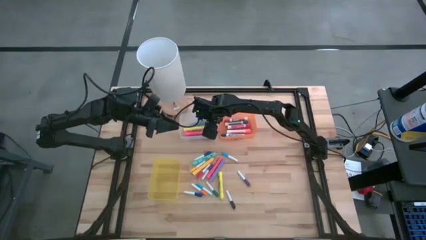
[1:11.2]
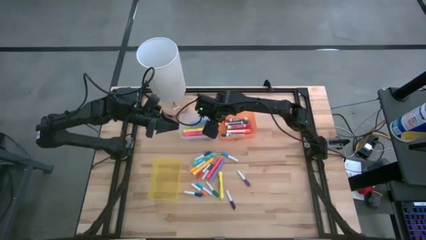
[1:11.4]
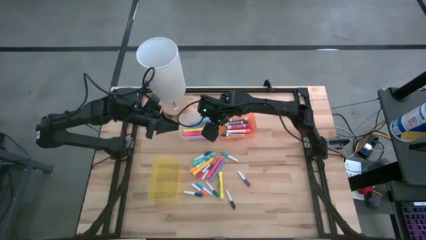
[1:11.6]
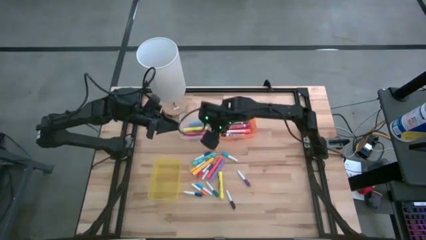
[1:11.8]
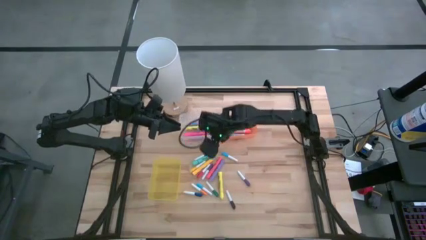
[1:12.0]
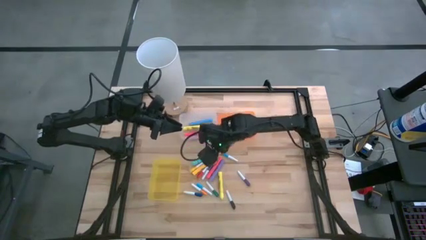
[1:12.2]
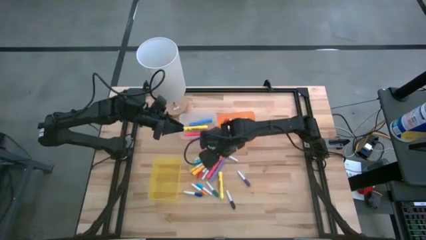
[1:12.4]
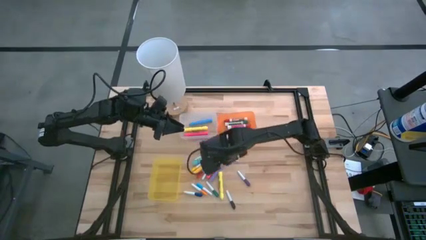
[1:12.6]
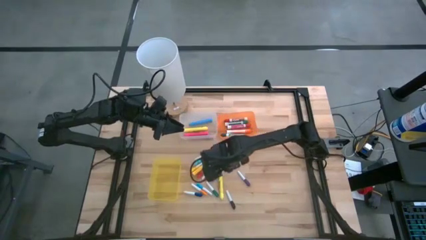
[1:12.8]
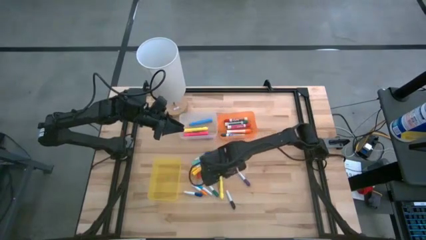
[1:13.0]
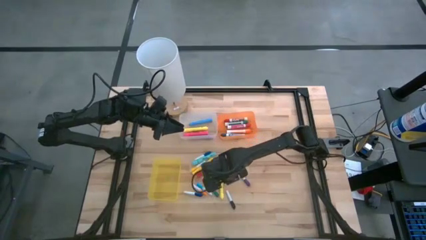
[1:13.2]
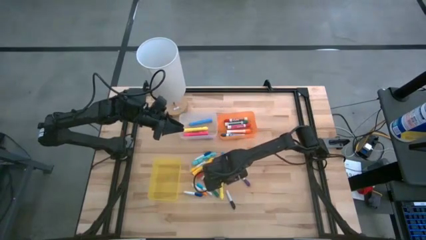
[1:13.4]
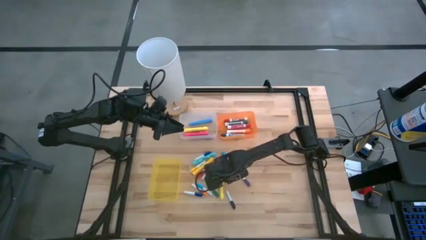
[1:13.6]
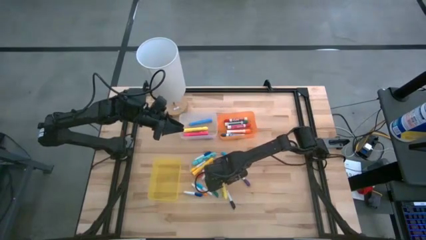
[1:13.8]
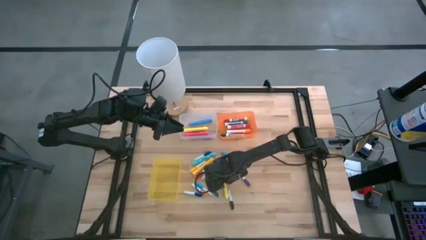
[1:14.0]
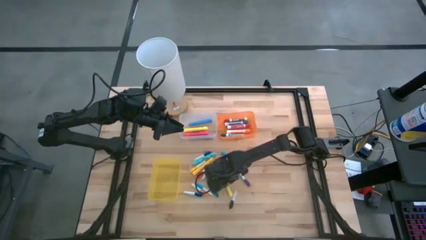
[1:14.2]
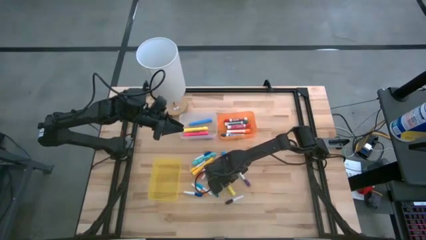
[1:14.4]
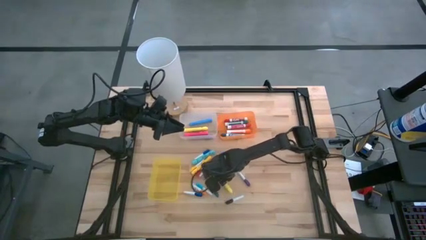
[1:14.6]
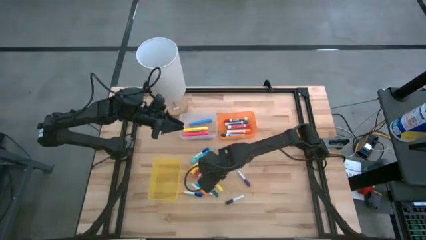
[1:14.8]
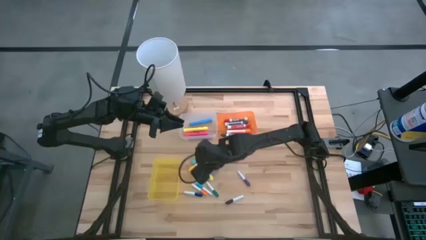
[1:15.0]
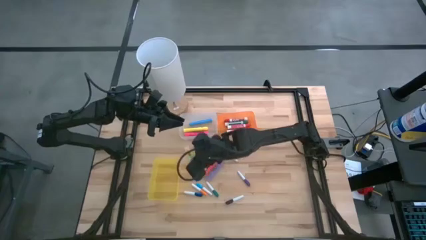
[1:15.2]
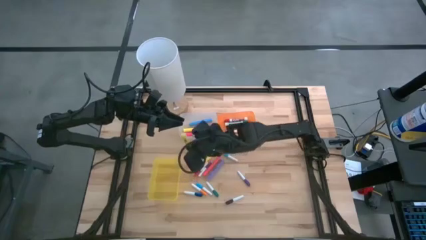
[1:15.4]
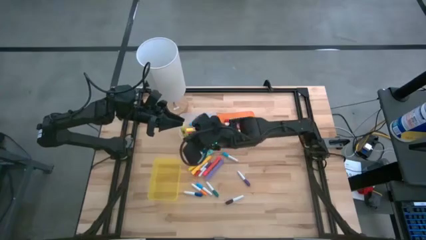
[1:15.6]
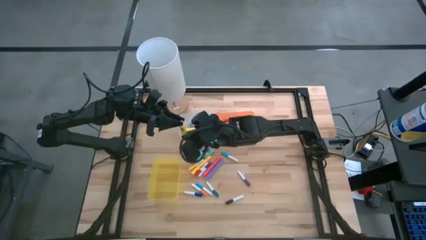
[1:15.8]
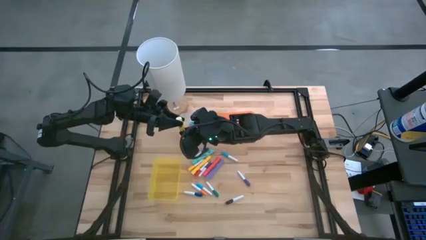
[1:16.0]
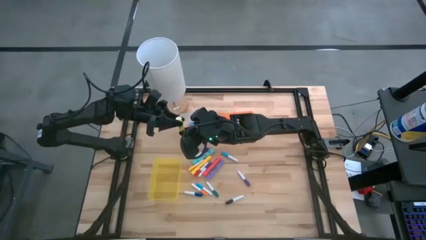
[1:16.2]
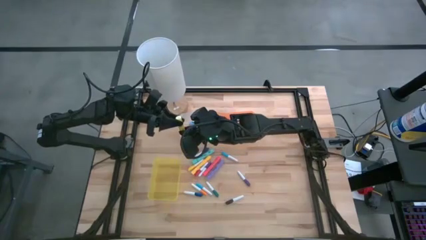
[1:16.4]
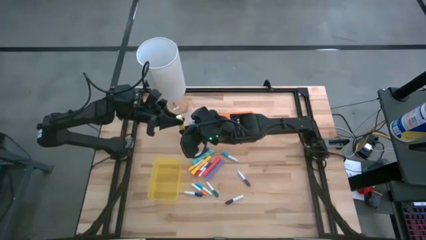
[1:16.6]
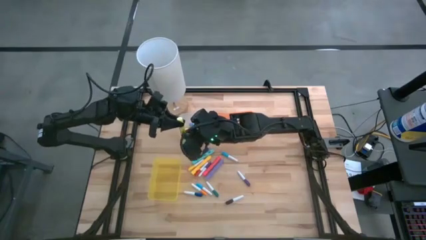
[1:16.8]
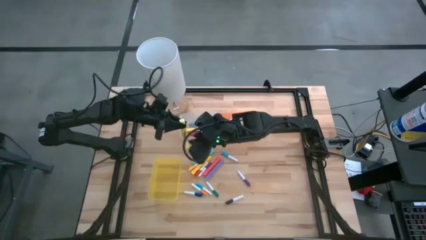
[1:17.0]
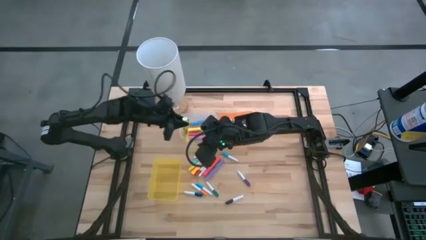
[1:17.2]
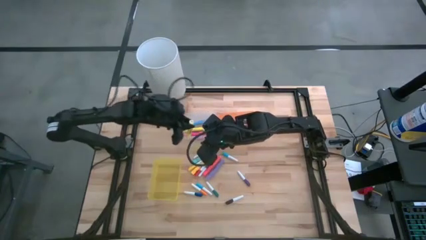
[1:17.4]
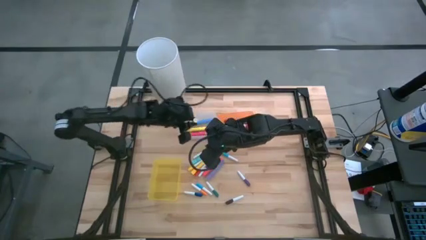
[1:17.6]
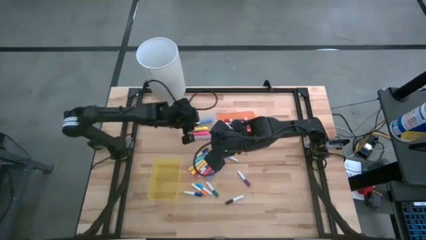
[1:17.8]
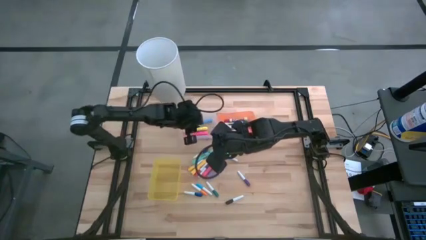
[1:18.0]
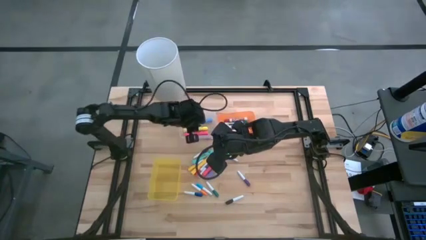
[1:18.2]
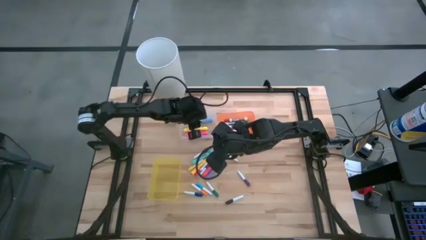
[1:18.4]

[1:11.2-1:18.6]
Task: Pick & Place Markers
Put the bottom yellow highlighter into the transparent bin

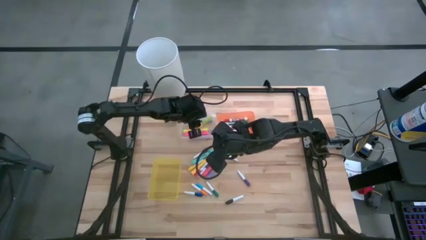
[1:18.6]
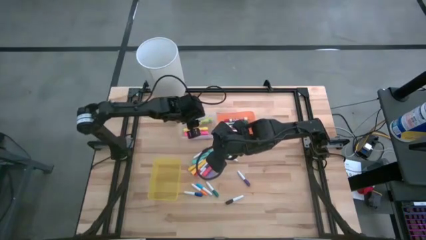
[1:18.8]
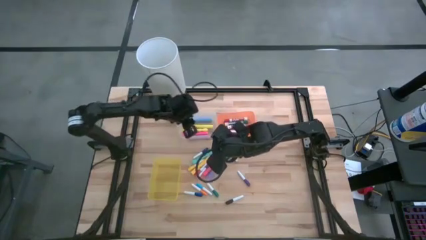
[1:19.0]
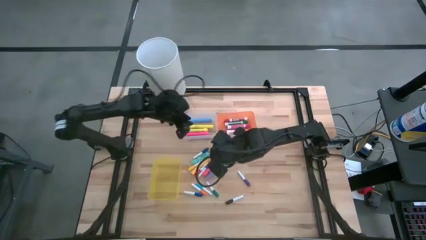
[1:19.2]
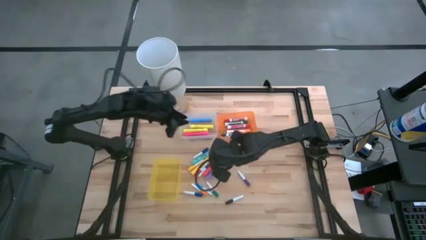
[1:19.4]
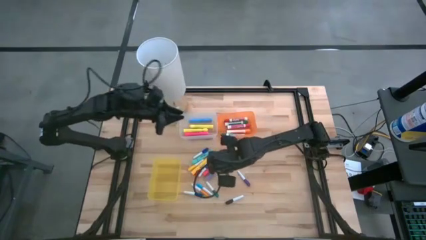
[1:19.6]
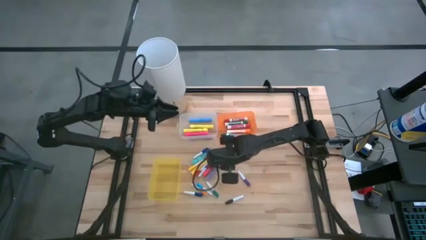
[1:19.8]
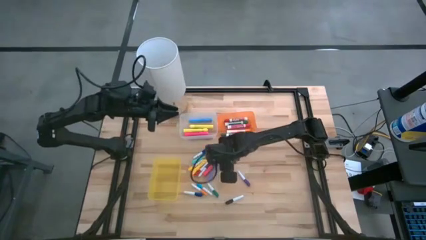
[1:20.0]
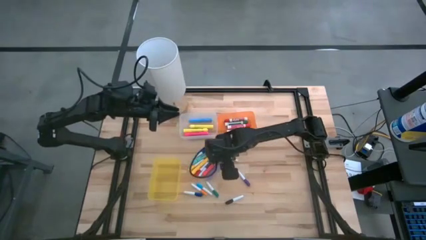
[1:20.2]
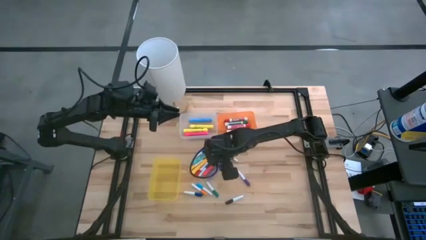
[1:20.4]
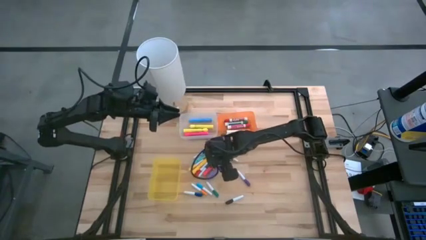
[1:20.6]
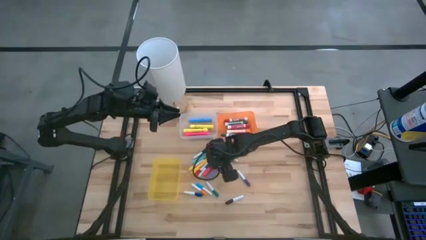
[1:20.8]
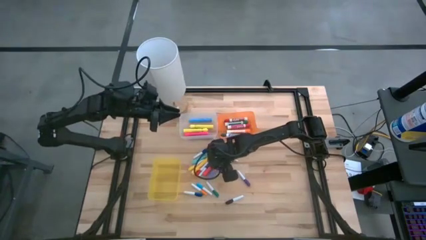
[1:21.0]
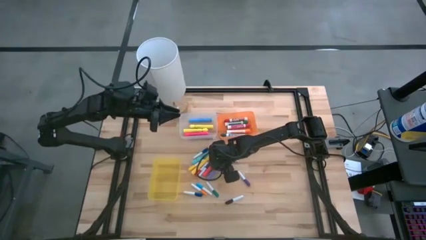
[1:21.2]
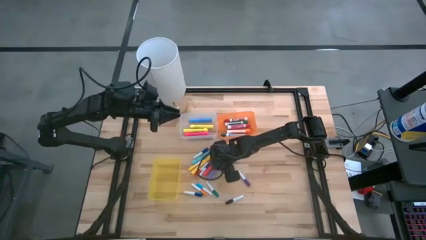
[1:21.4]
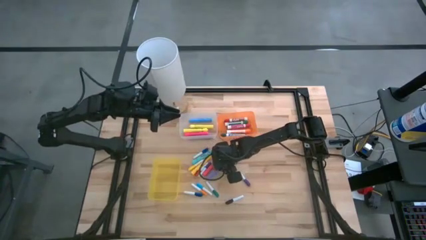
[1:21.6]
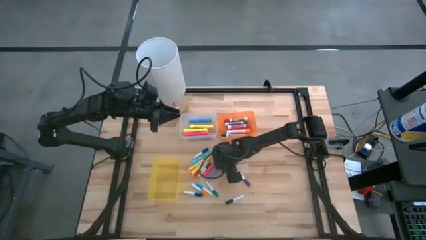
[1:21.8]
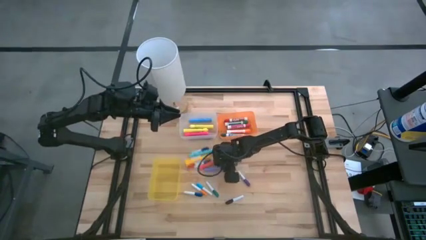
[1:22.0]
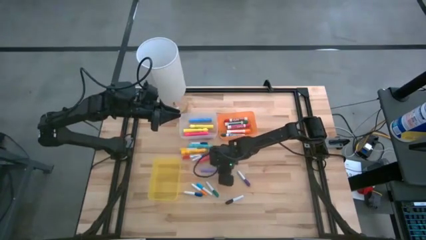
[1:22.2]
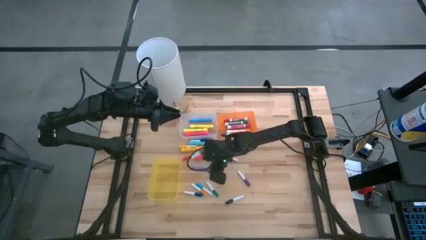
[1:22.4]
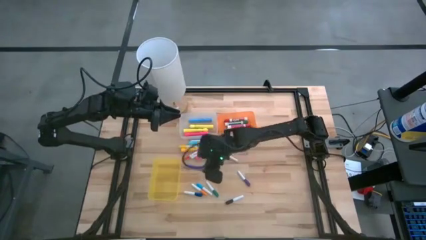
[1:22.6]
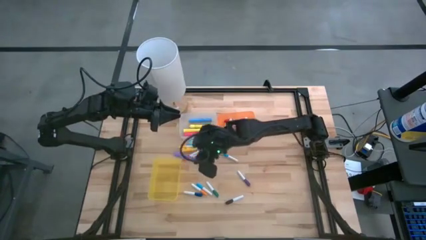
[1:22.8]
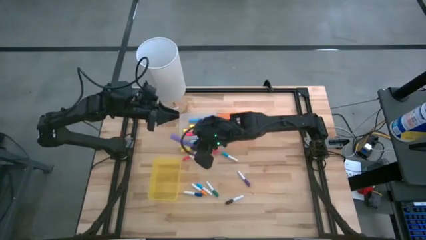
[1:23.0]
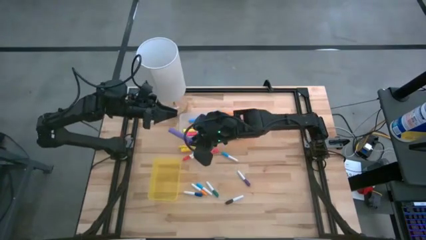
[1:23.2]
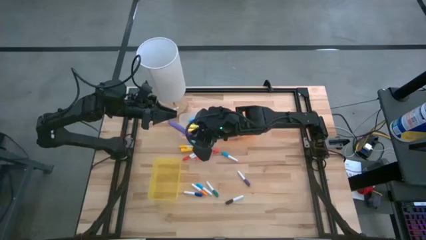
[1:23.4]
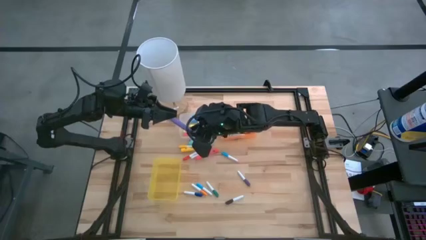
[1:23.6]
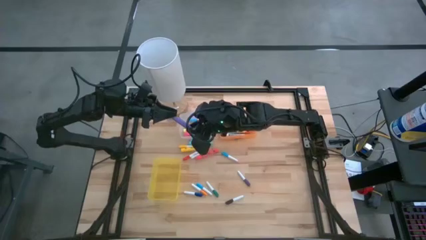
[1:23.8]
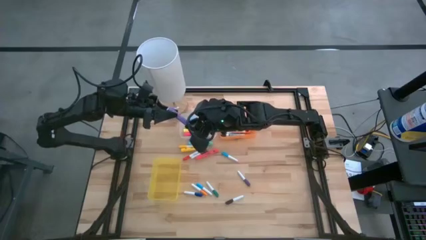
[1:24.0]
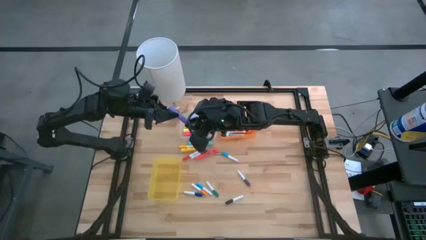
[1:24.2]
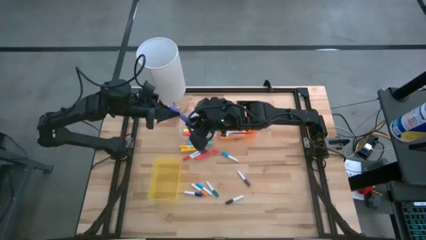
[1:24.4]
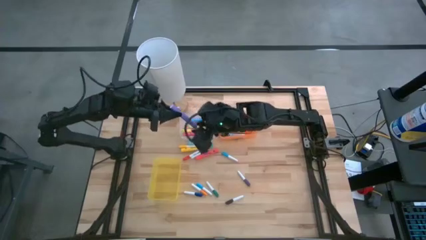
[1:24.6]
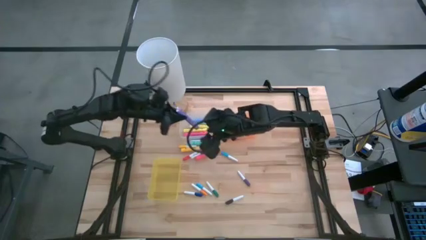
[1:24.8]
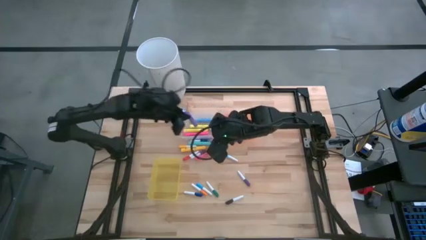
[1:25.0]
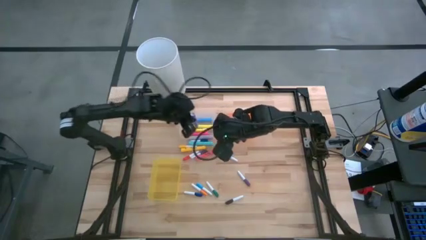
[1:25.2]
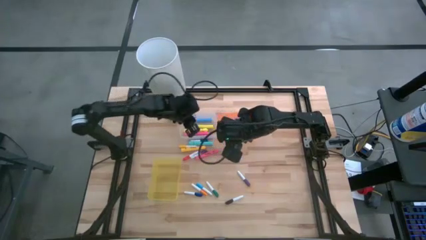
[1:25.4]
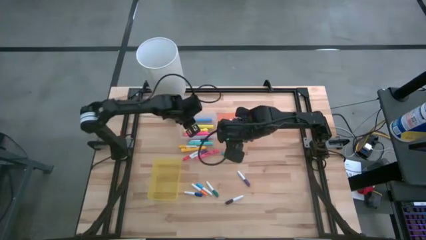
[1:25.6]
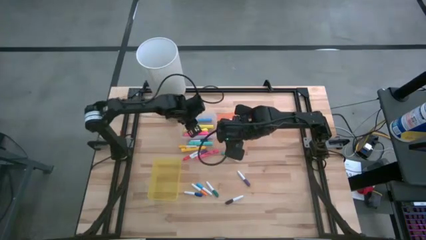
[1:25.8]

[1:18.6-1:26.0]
Put the purple highlighter into the transparent bin

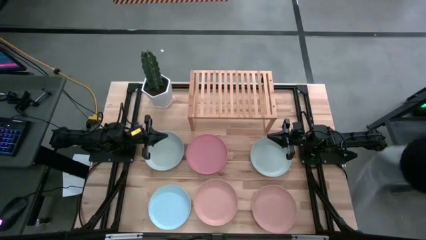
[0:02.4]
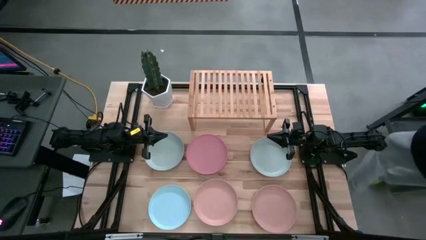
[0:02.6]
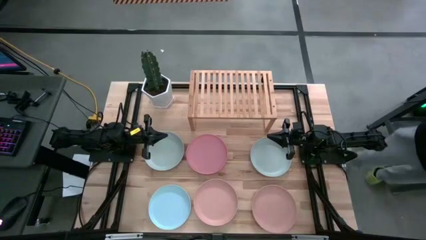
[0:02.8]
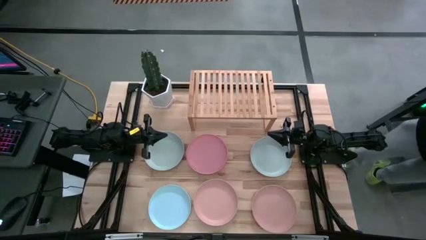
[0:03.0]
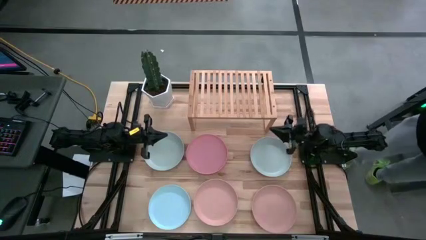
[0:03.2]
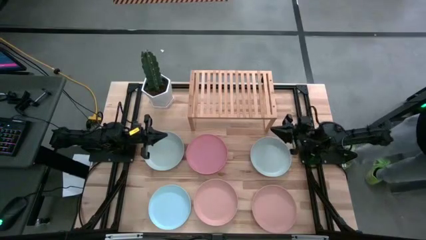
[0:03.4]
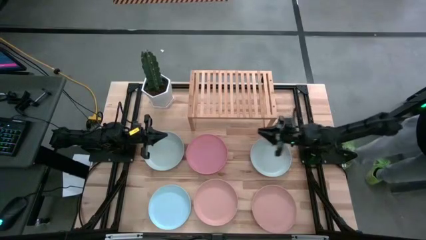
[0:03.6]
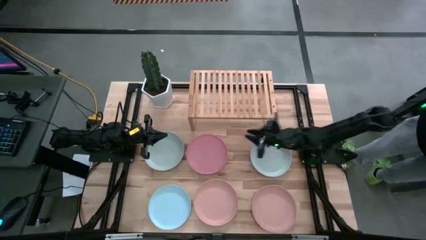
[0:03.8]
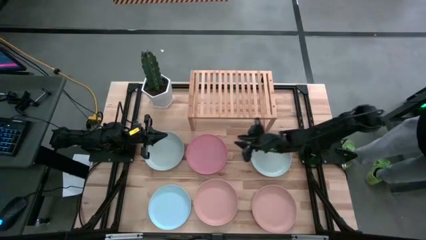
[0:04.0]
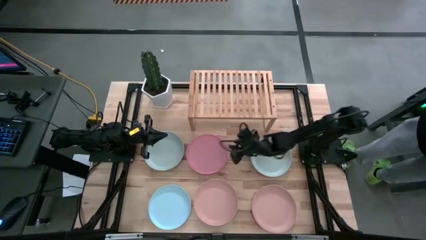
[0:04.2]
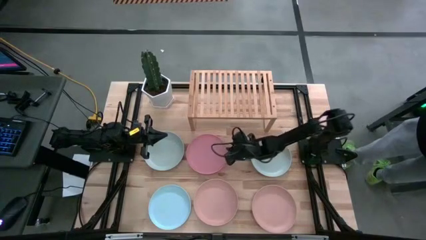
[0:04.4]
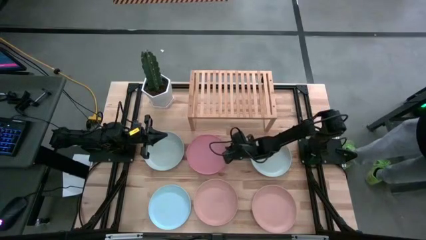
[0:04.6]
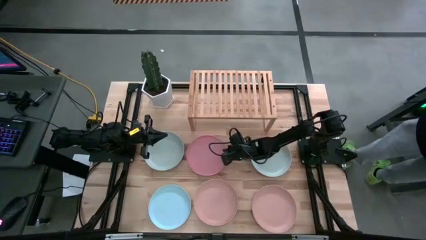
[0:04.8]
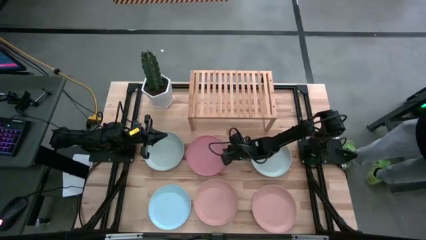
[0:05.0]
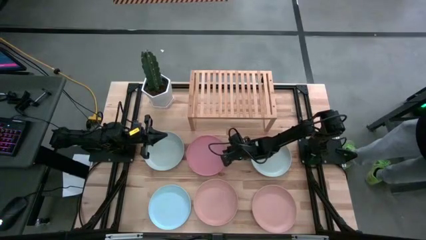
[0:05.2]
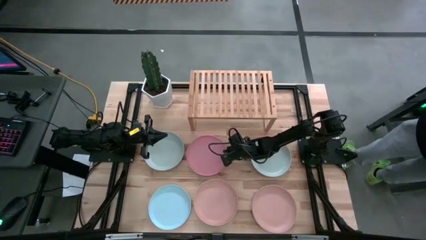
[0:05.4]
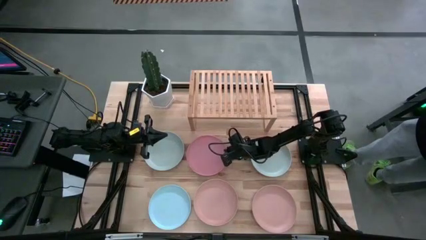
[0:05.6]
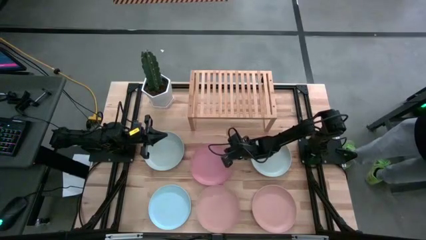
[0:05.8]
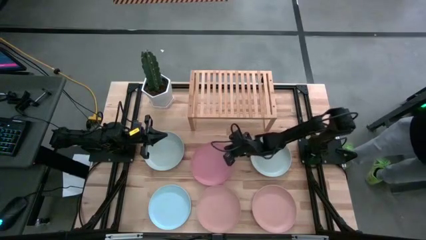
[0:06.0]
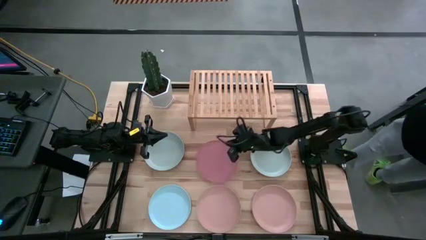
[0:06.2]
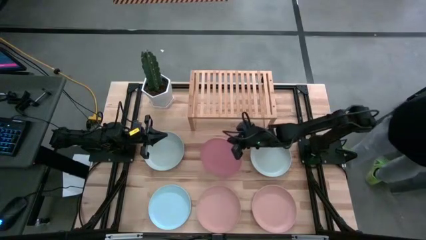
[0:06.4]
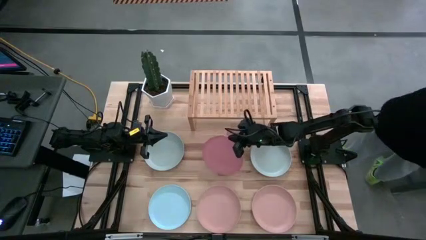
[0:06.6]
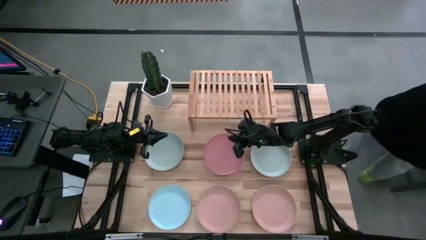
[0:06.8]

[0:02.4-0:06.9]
Task: Place and stack plates onto a shelf
Put the pink plate on the shelf
